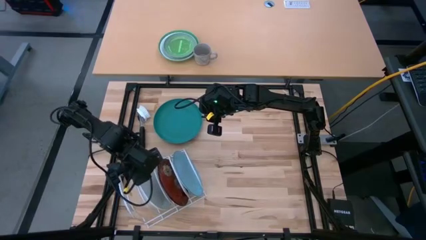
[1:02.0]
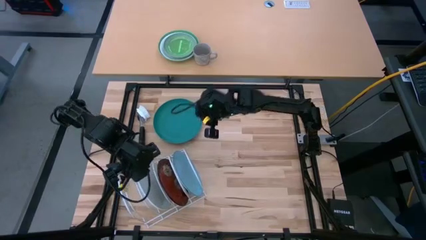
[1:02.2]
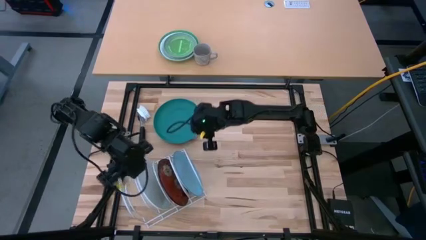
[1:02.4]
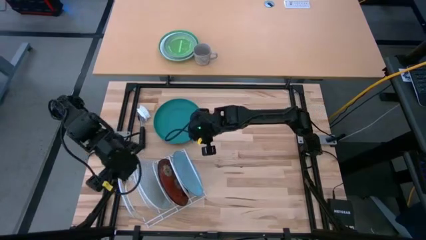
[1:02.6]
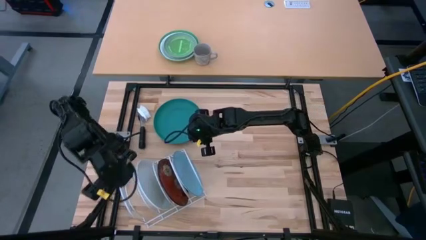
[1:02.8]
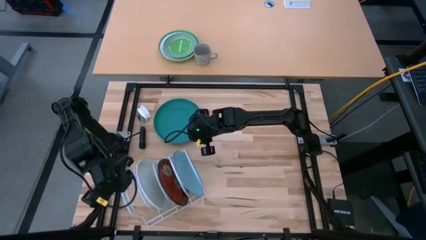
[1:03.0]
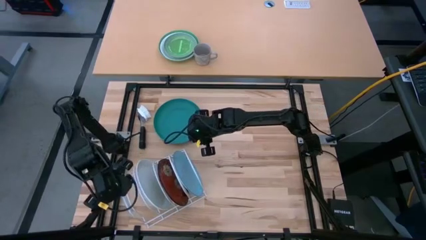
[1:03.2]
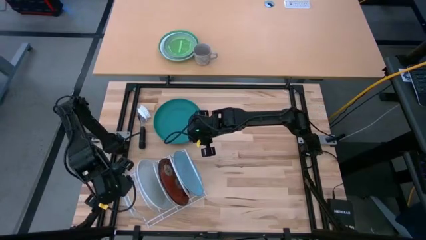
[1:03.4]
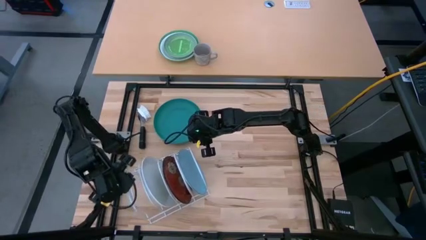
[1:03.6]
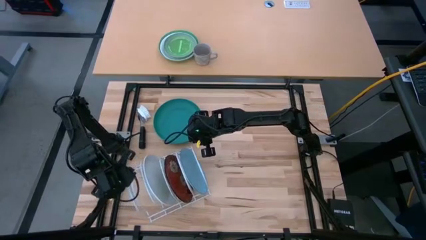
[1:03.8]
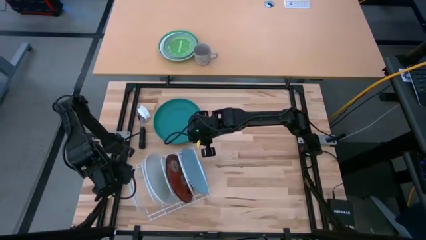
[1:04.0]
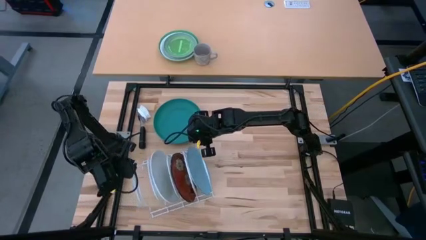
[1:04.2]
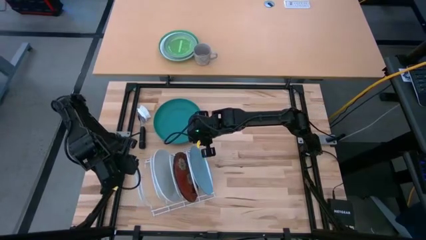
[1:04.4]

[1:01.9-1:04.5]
Task: Sort dishes
Adjust the dish rack

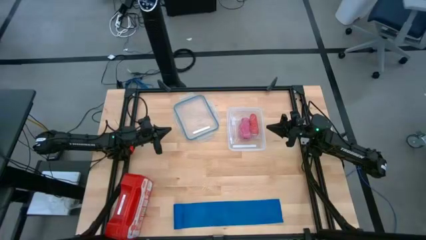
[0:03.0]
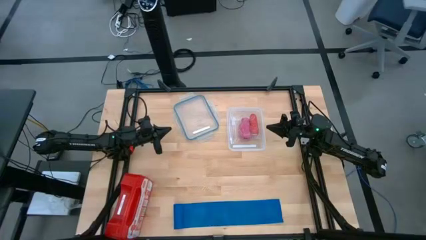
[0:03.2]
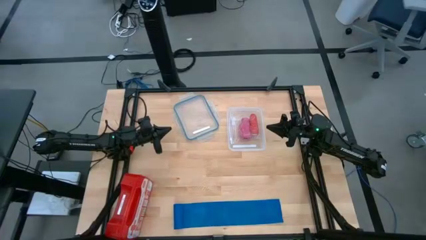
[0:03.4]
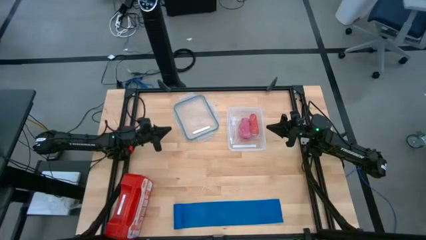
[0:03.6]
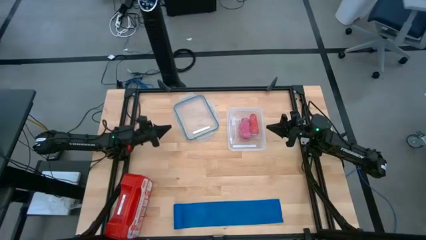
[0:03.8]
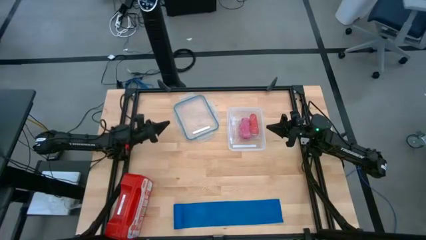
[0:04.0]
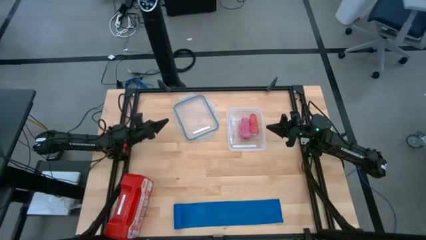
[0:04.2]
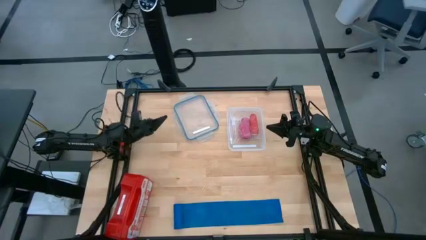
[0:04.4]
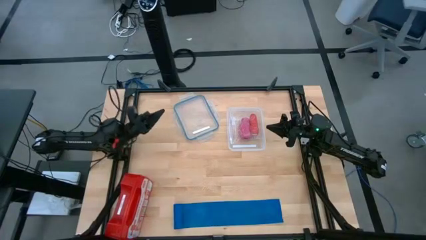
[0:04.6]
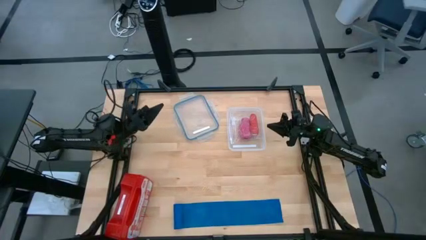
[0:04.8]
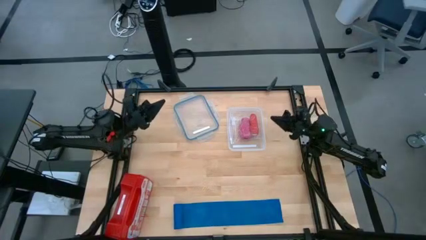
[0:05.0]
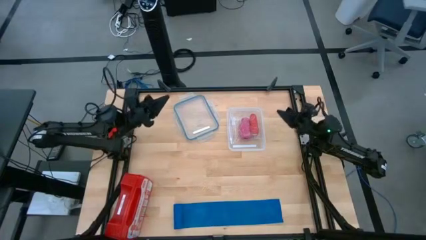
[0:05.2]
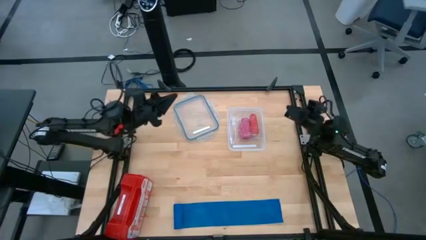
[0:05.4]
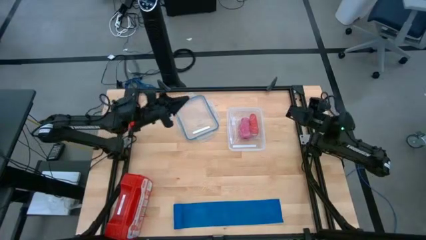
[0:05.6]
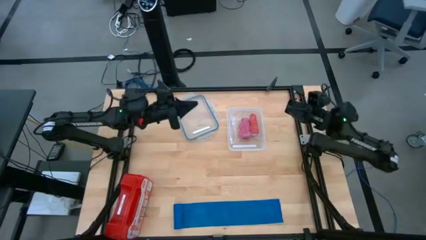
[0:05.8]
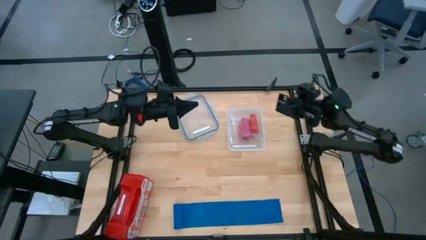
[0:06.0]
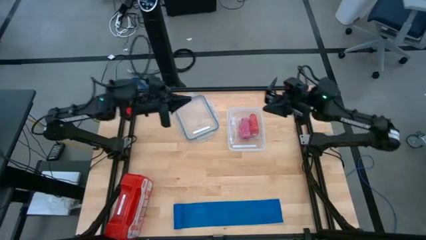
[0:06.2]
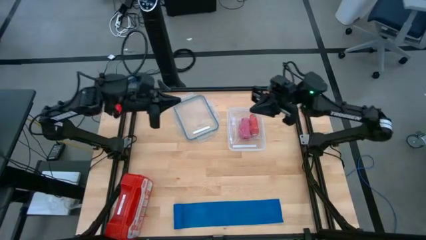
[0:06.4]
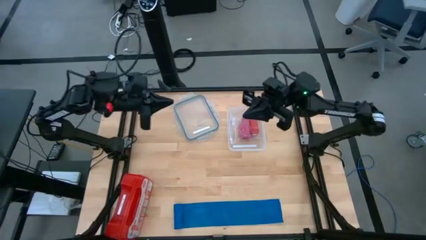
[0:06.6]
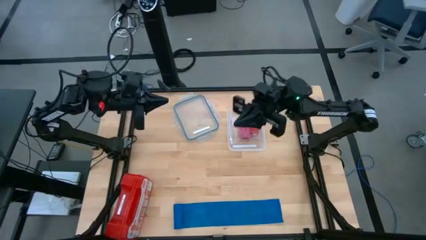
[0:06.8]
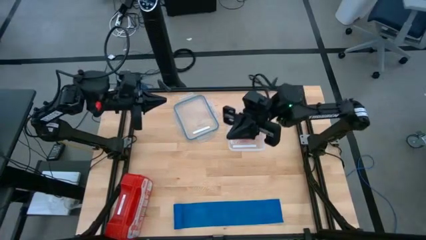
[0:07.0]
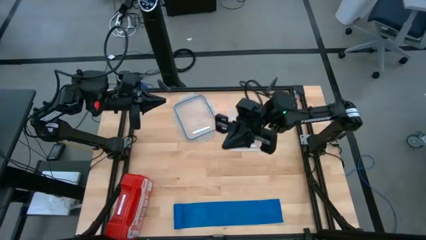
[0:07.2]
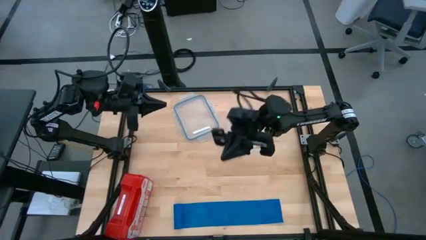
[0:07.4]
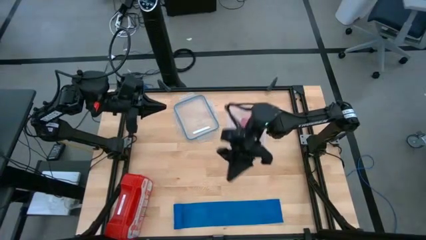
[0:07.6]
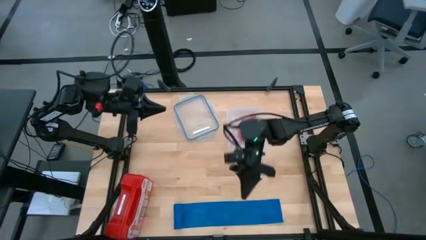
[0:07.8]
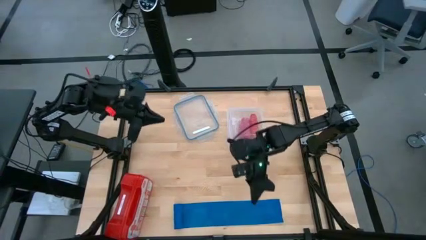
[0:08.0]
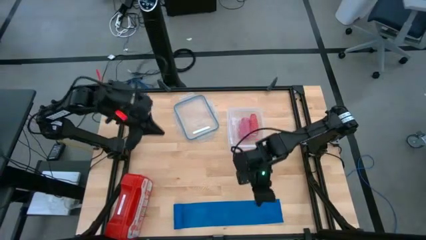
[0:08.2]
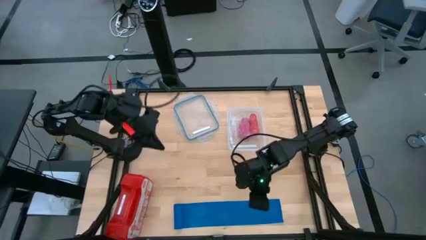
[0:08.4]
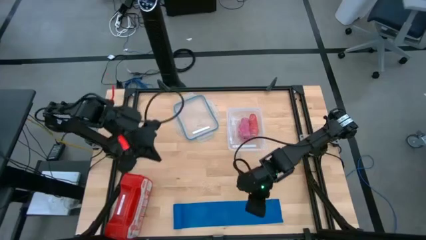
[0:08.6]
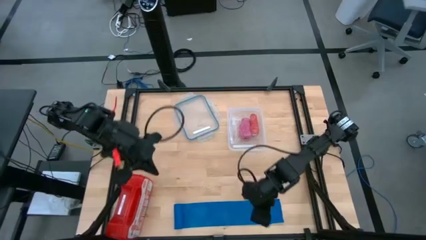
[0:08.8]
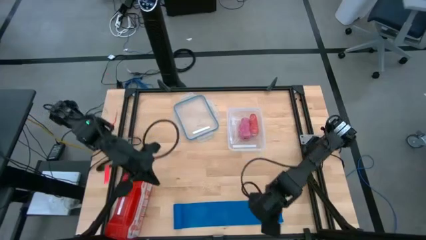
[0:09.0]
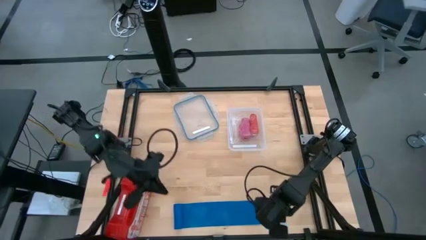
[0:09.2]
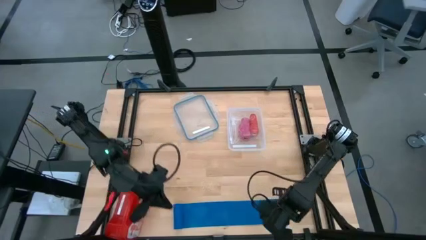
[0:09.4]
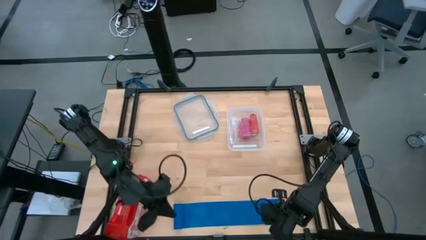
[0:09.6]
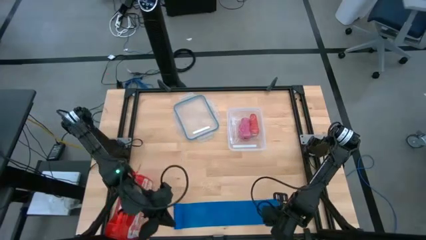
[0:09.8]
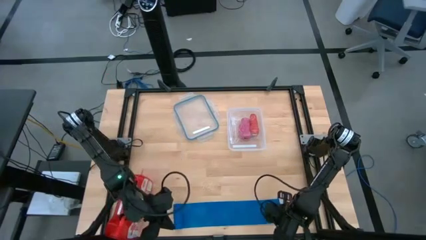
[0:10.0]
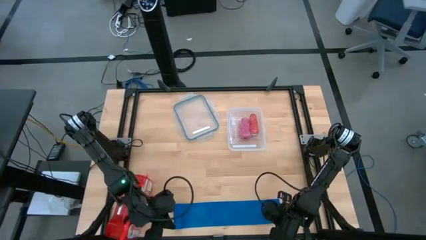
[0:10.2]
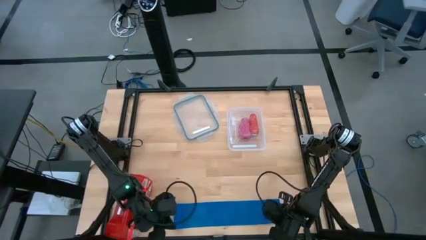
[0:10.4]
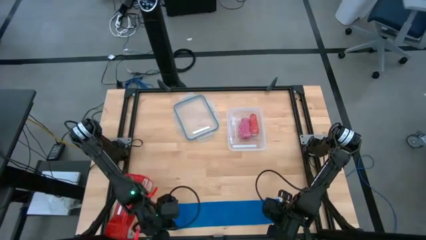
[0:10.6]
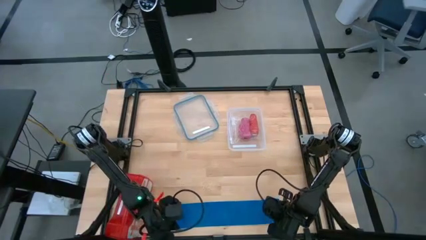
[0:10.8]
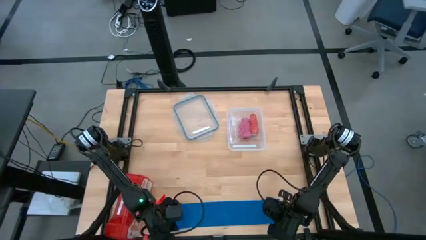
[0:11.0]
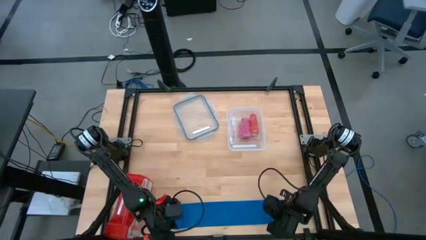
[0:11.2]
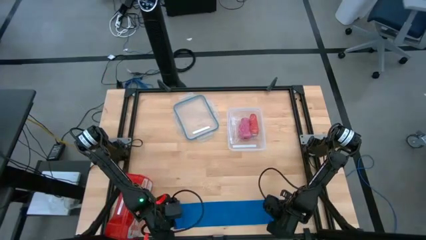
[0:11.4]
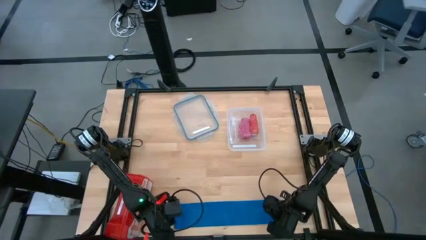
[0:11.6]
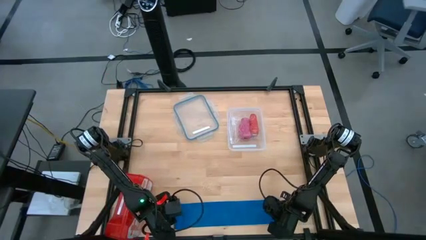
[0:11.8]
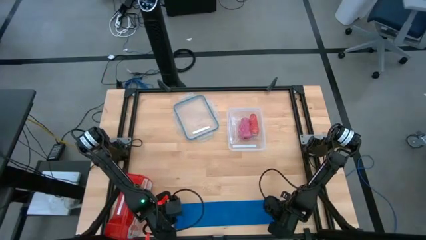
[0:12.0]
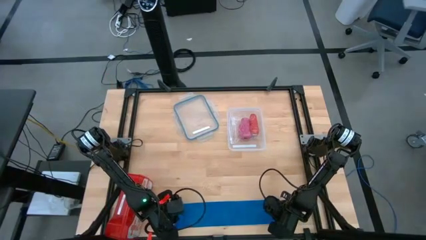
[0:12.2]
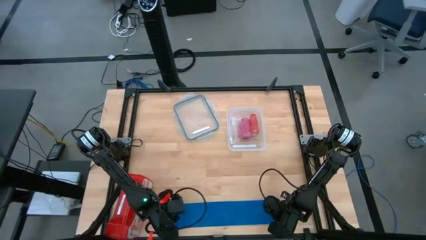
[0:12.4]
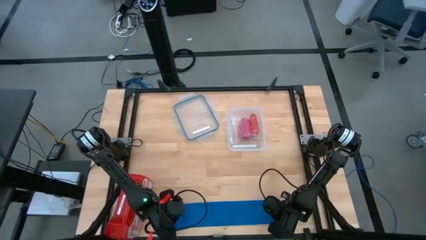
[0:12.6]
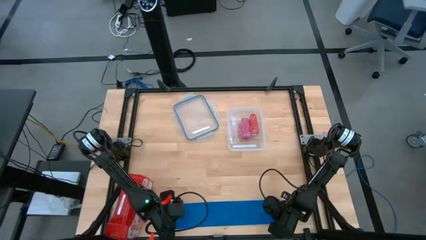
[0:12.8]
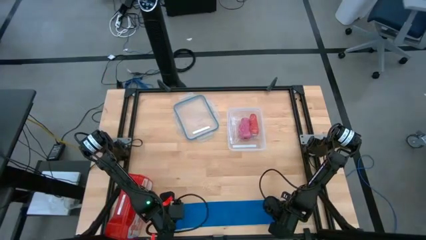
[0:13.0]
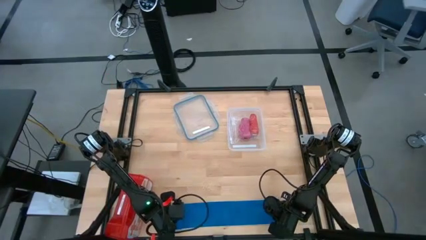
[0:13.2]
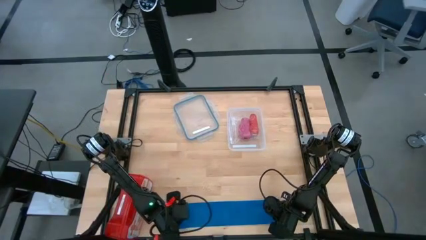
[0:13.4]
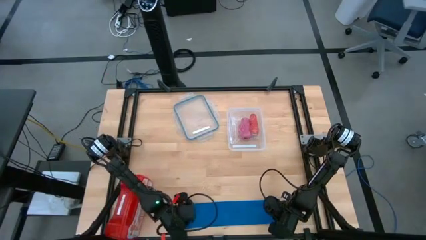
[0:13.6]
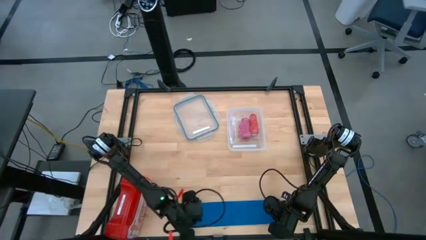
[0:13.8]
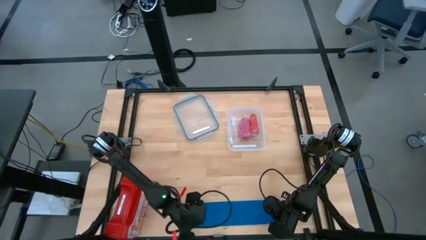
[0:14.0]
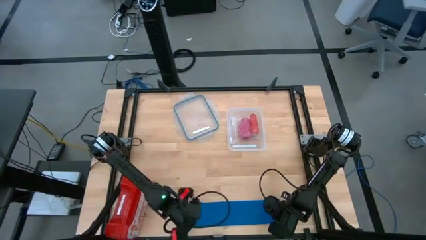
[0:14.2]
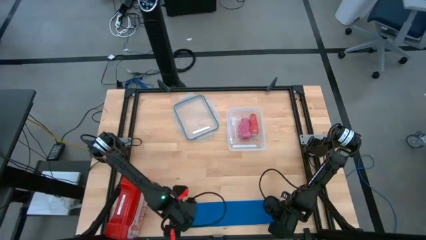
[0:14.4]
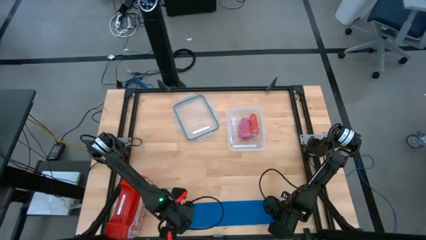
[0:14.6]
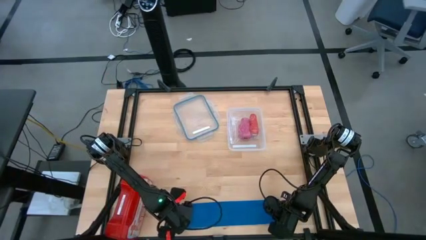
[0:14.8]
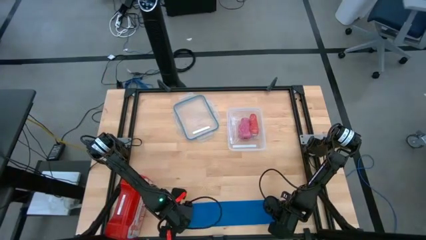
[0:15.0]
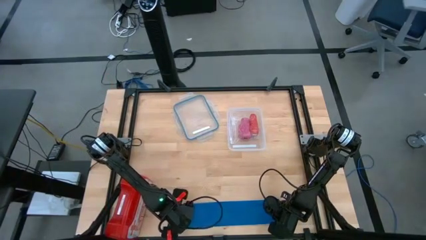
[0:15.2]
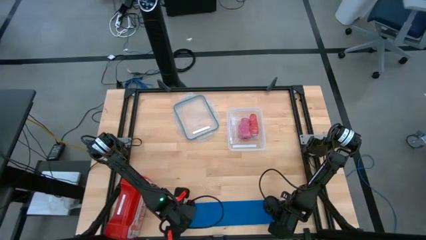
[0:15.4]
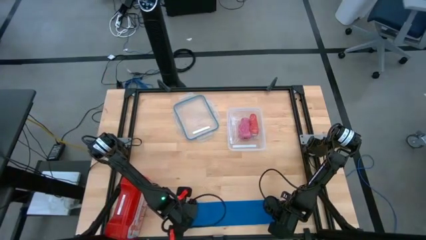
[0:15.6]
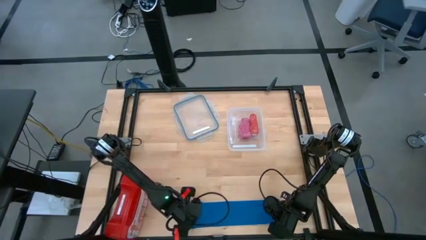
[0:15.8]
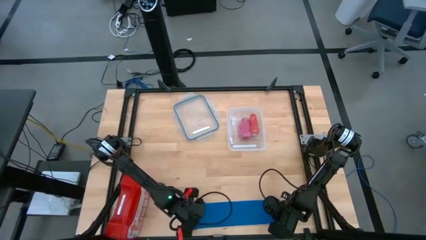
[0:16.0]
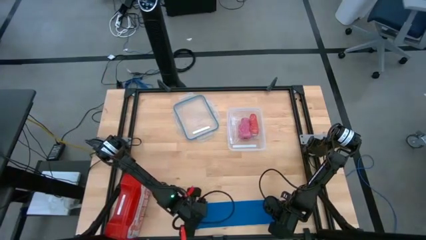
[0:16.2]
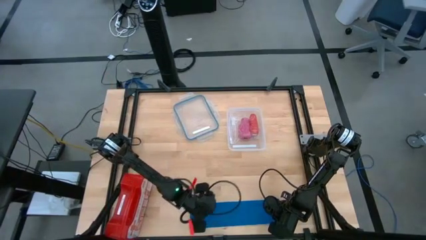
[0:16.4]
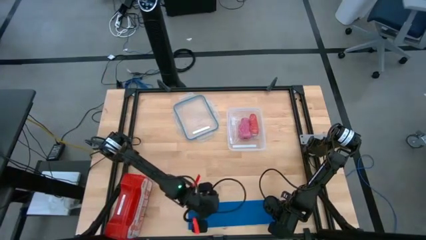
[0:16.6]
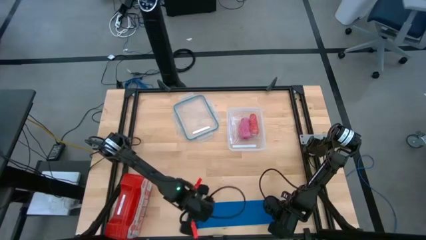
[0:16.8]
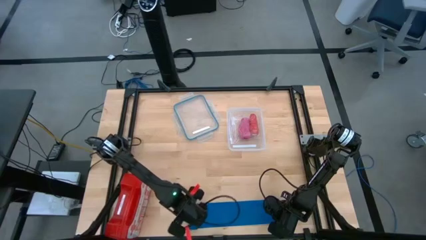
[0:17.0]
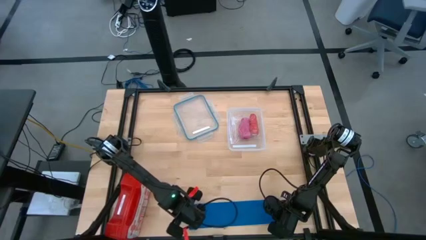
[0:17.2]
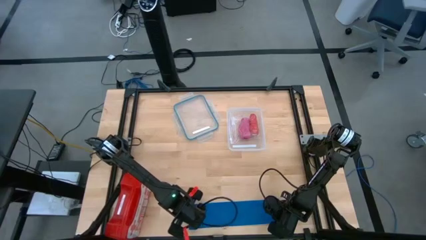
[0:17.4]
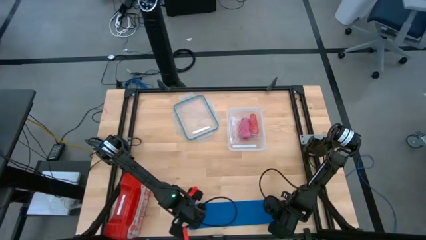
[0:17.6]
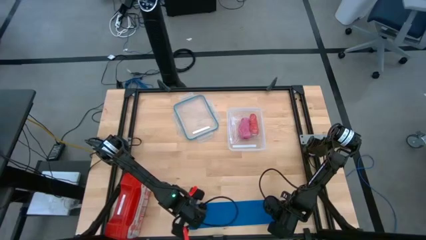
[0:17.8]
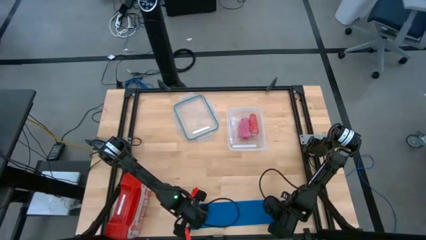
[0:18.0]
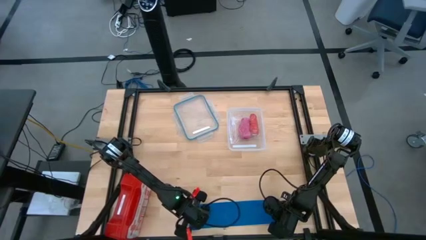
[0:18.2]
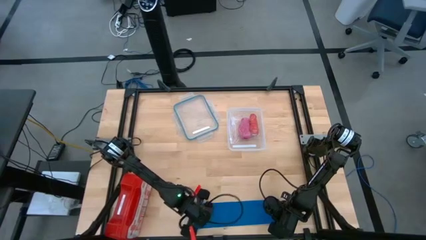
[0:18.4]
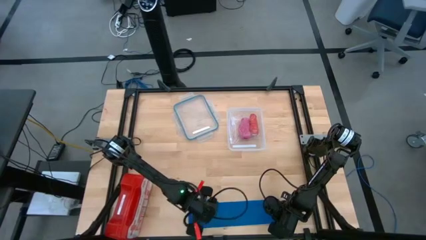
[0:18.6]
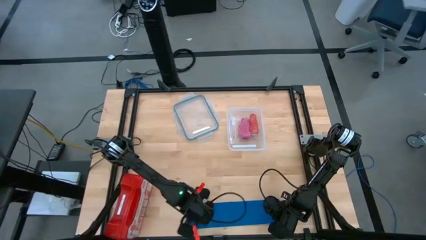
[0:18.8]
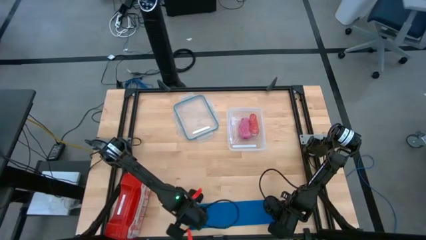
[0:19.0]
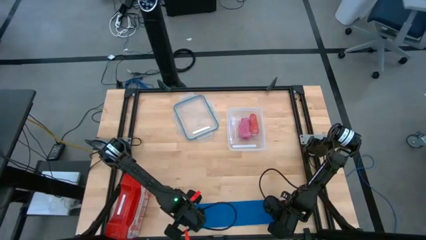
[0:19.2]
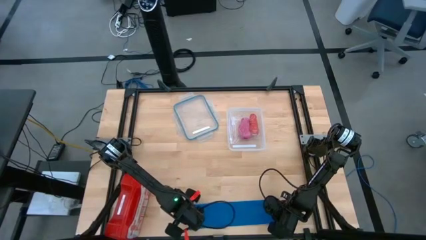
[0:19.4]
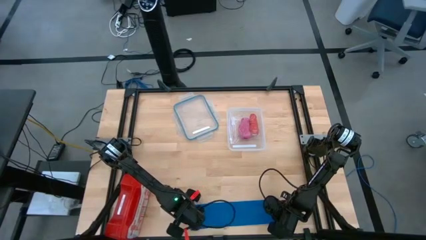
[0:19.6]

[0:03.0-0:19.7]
Task: Roll bandage
Roll the blue bandage
